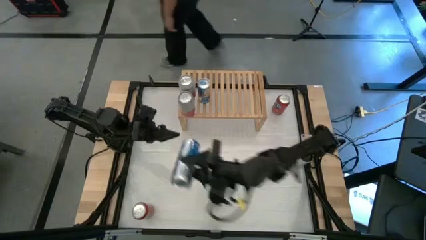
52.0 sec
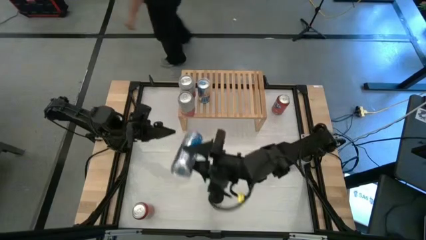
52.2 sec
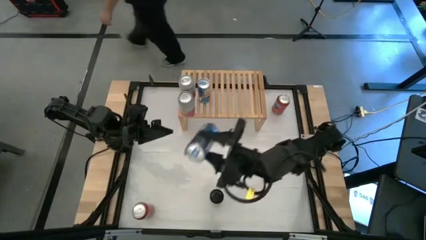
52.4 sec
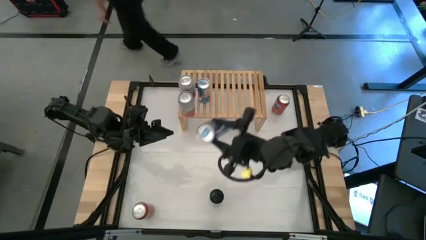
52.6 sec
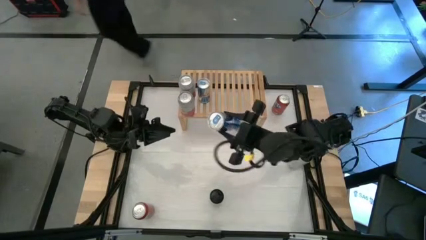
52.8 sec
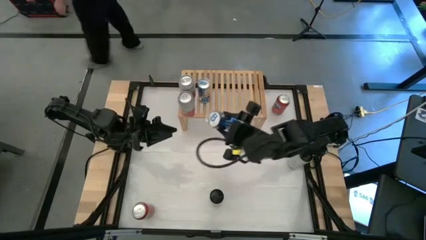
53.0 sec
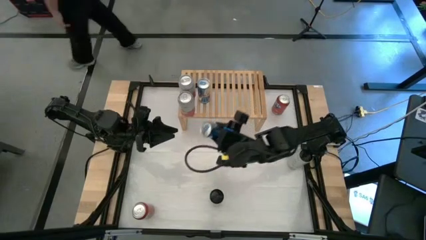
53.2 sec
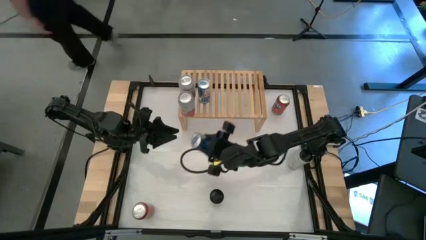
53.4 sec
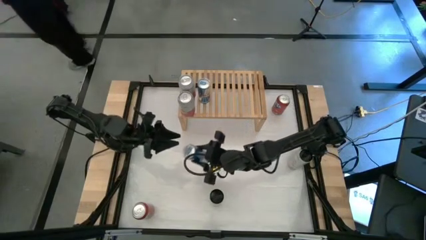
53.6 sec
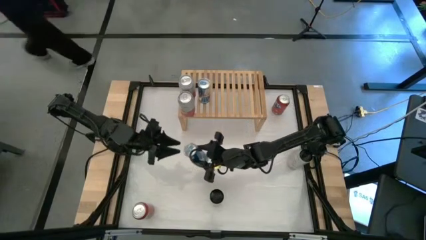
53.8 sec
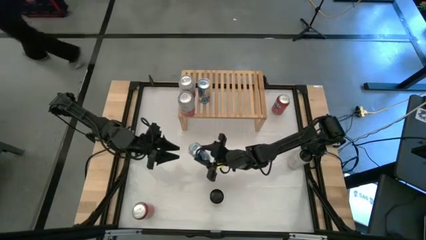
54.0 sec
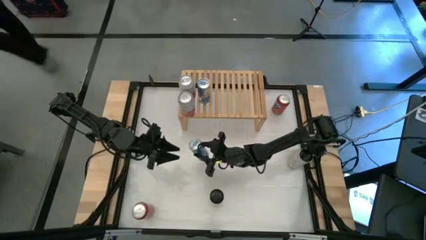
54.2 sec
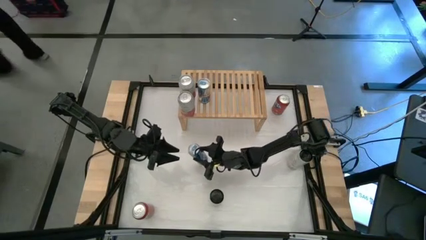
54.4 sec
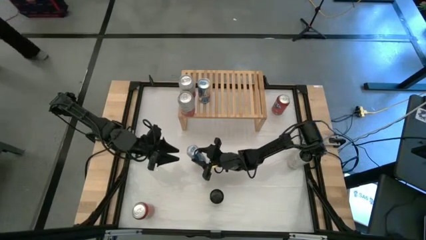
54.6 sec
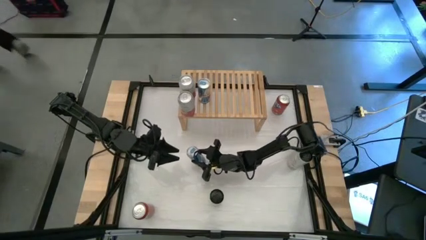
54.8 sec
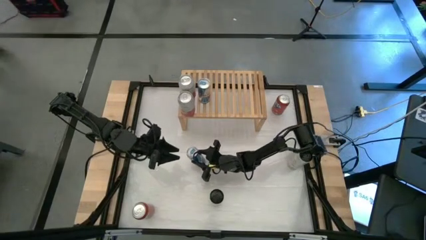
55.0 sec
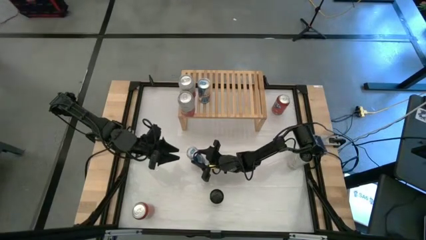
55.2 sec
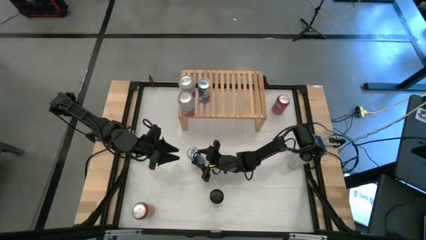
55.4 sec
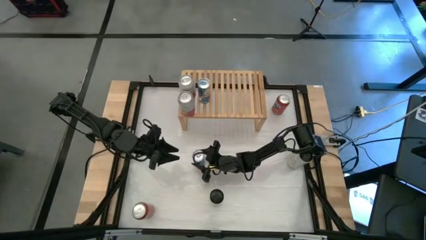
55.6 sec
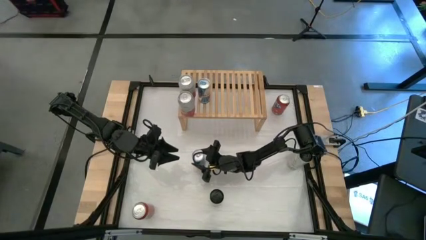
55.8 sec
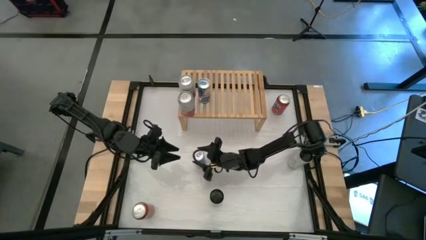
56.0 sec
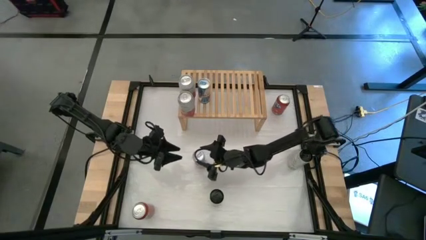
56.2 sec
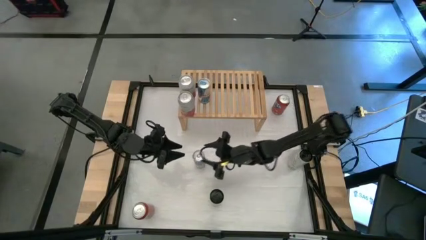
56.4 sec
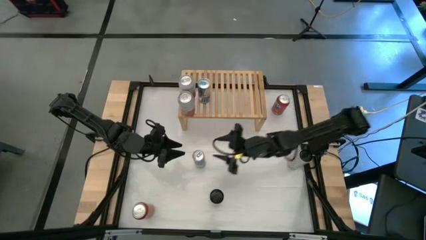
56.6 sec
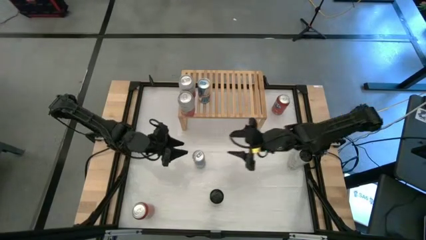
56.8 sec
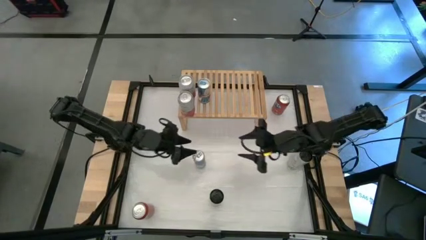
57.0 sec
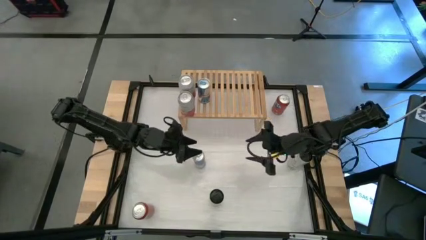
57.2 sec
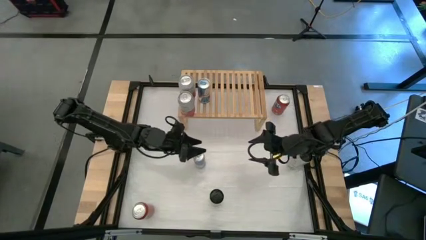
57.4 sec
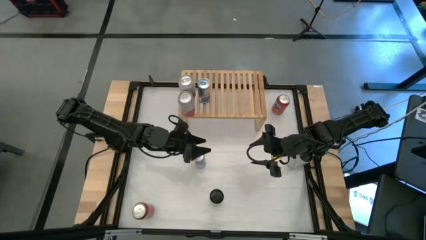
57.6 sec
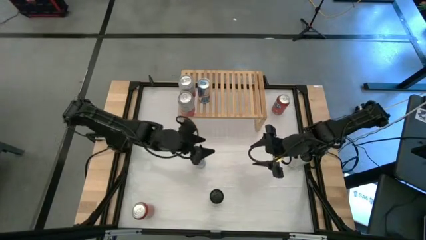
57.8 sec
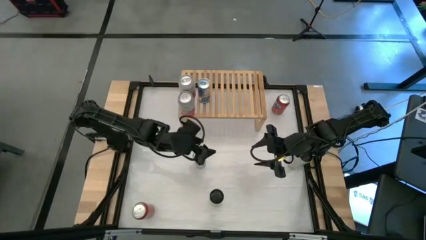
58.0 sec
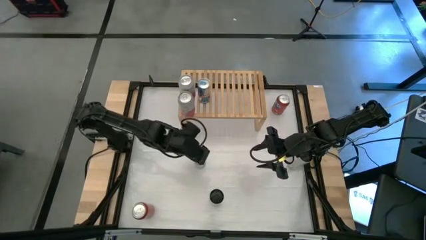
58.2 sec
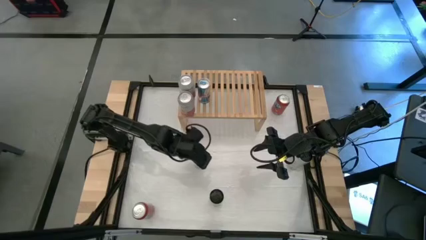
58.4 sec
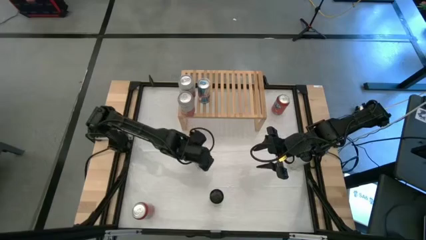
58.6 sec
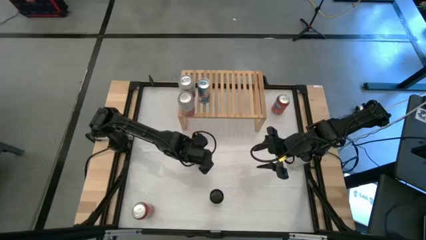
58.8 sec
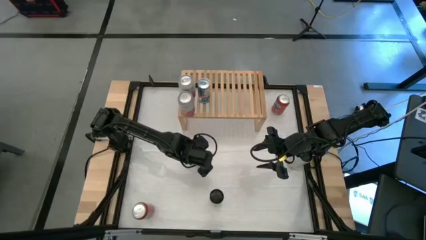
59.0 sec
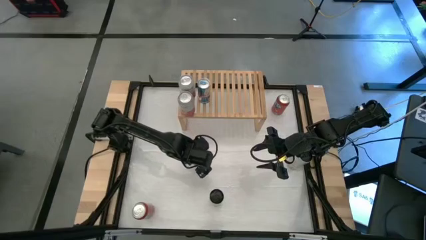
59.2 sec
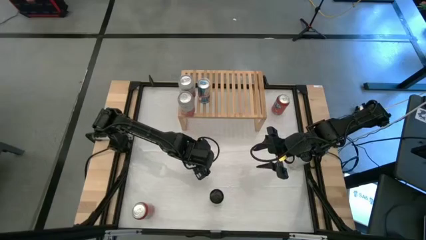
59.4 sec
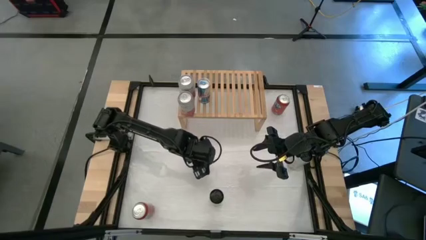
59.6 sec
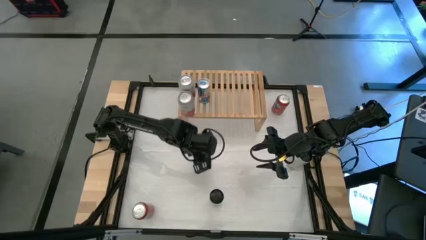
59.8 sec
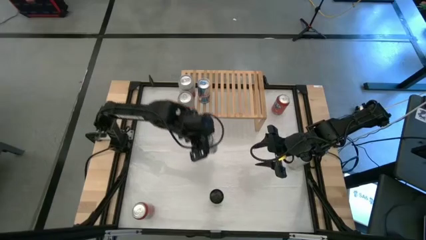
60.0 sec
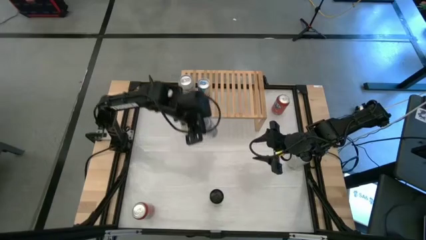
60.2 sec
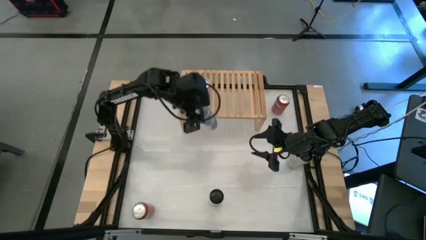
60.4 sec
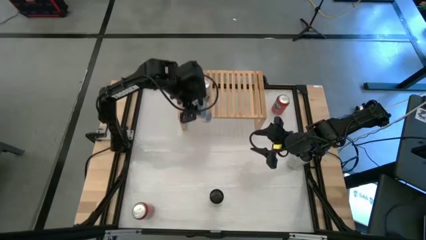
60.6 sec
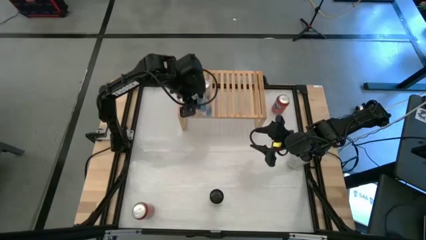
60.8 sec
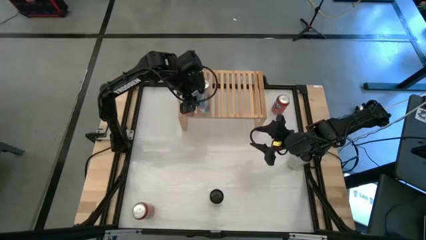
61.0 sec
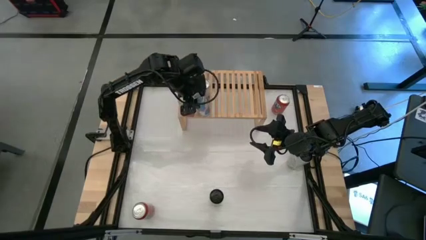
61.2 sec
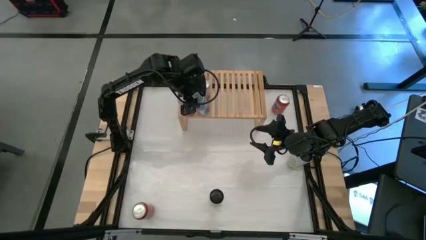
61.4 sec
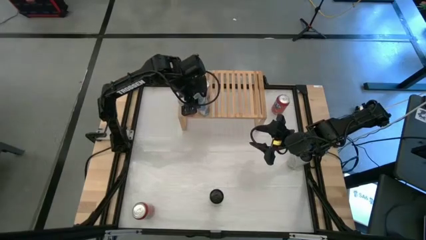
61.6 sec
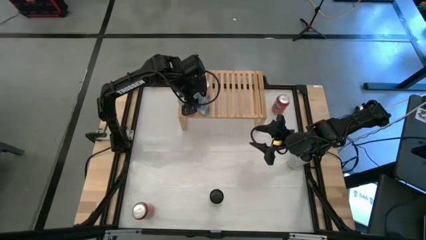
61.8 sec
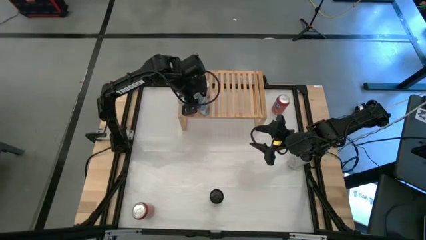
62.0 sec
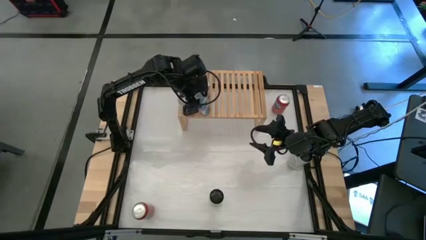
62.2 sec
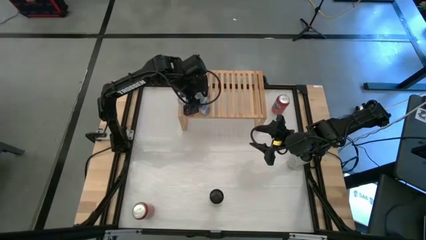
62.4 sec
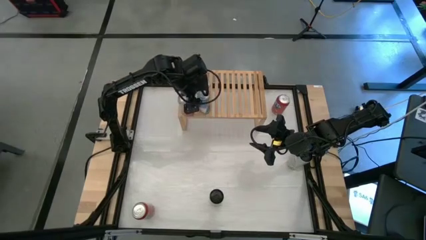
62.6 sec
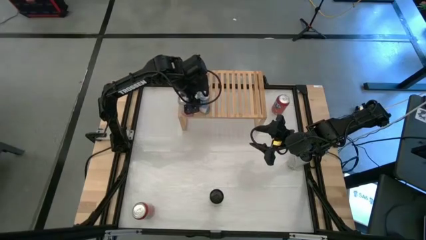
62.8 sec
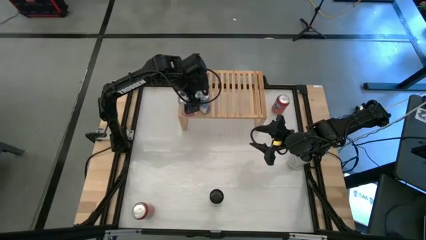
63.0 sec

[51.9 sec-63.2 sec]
Task: Place canned beverage on shelf
Put the blue soda can on the shelf aligned with the other blue soda can

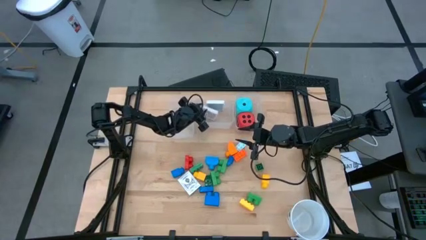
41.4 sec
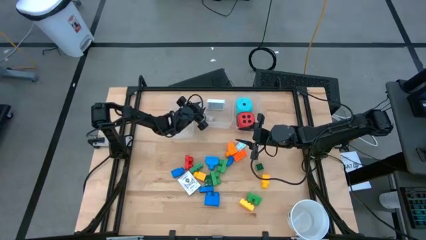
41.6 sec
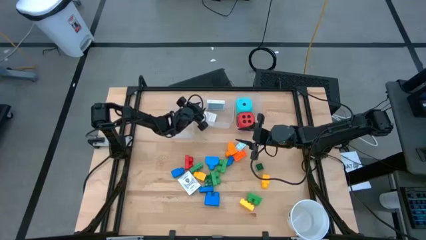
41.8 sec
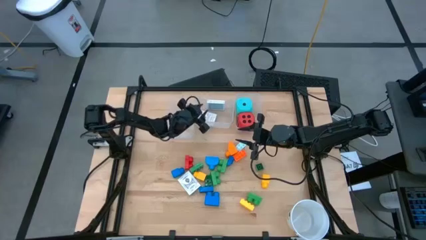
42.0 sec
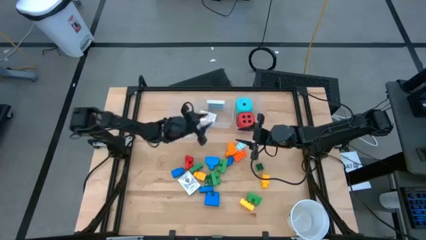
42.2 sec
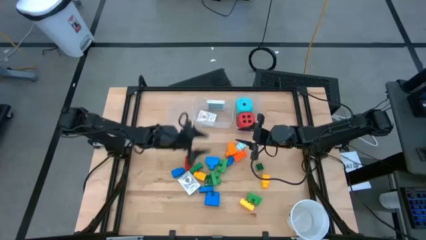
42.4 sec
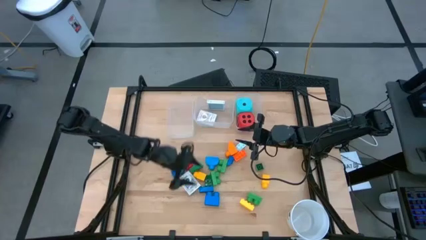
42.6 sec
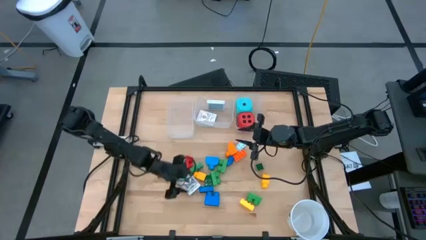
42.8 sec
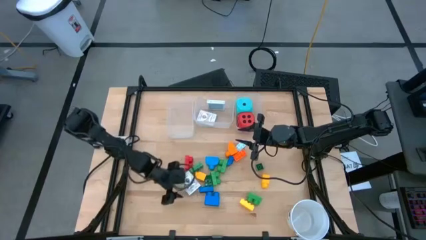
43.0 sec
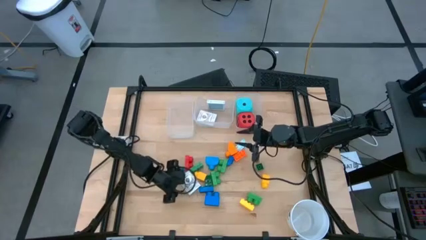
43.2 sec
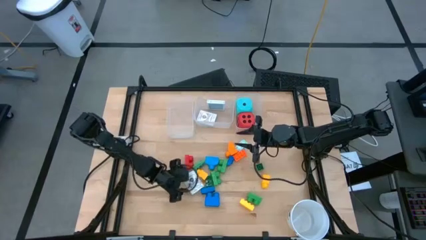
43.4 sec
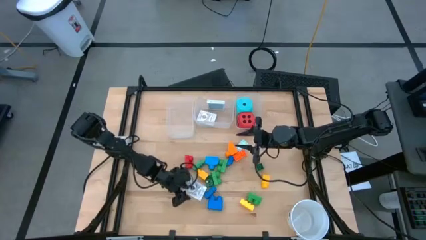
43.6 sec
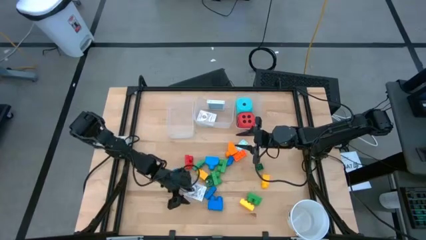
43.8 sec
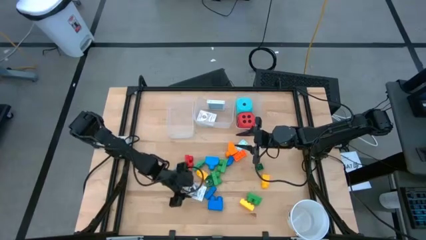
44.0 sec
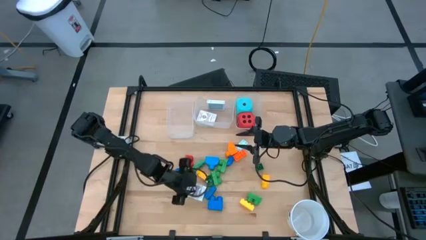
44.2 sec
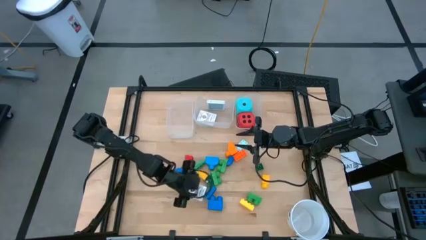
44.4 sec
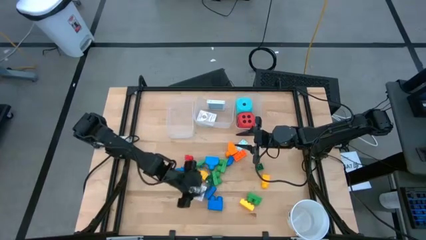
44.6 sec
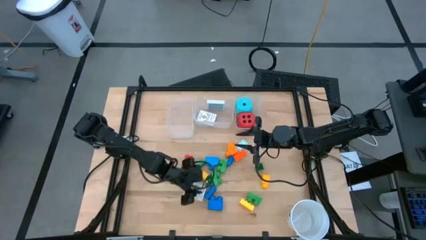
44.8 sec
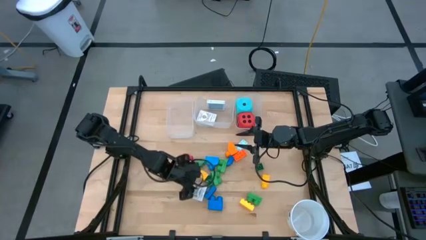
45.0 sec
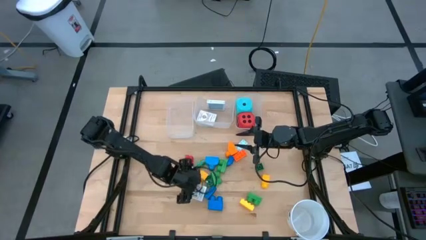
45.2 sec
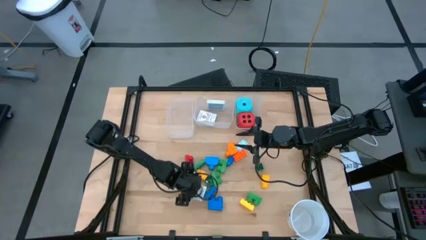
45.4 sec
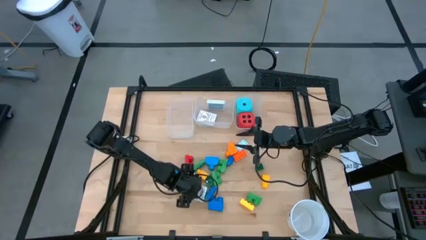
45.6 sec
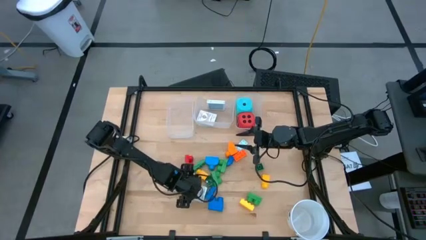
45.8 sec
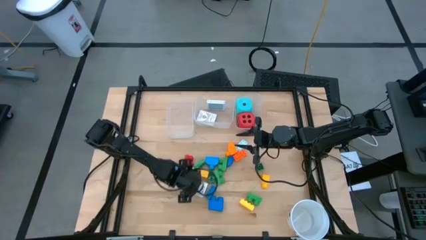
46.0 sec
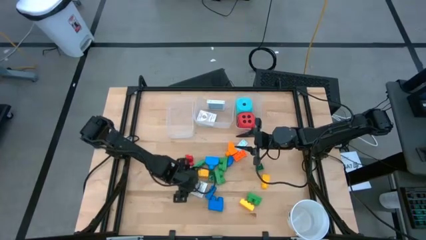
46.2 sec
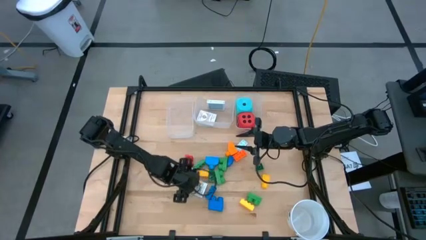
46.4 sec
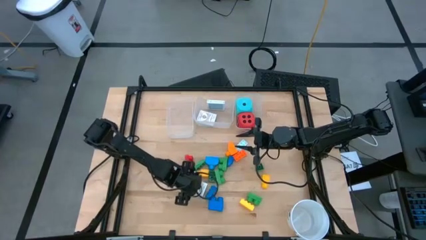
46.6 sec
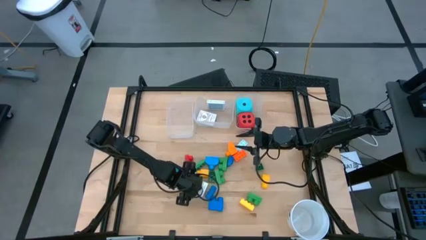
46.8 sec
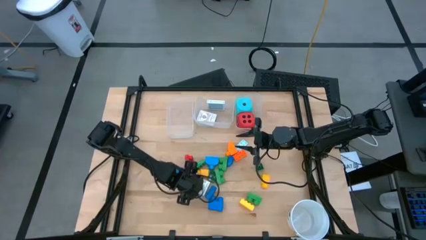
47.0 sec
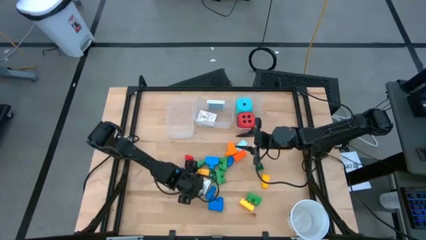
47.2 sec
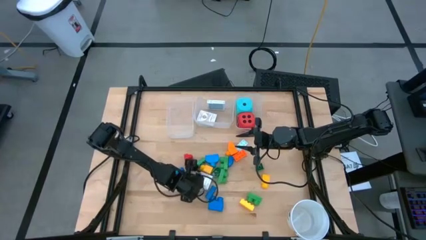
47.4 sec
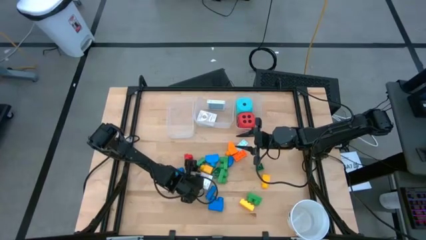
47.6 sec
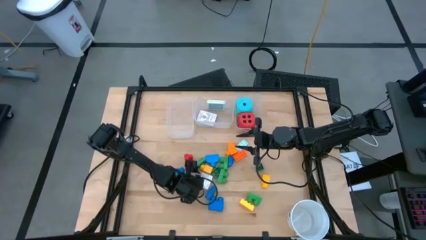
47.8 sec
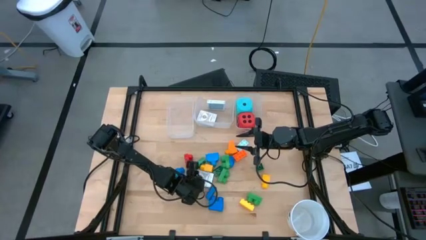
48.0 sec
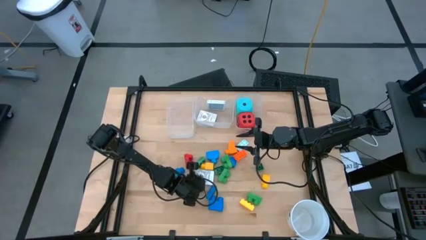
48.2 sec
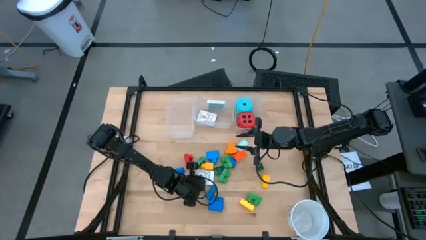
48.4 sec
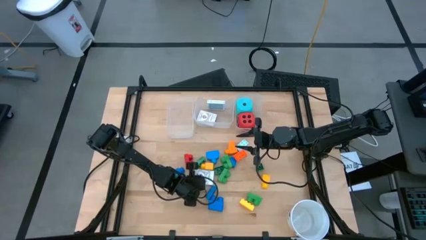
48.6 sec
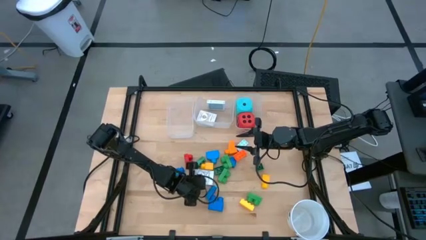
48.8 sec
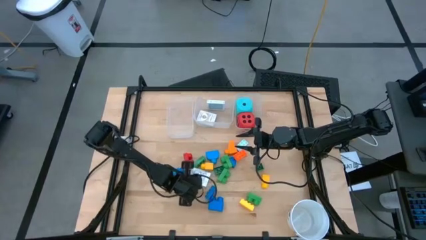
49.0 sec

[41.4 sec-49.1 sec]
Task: Pick & Place Toys
Put the black deck of cards into the middle transparent bin
